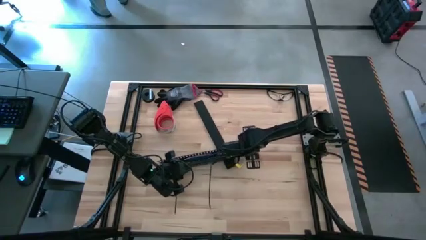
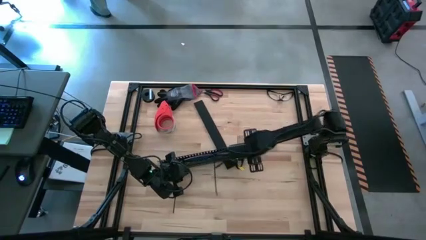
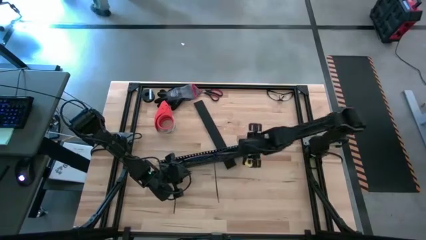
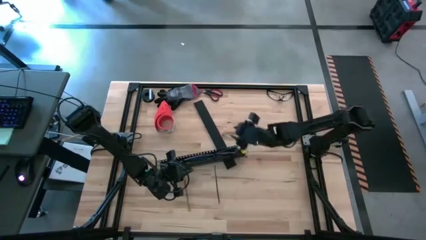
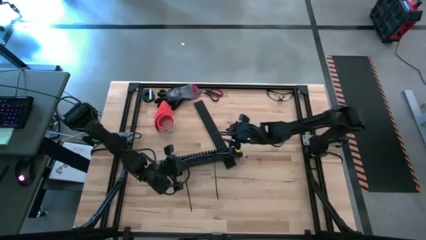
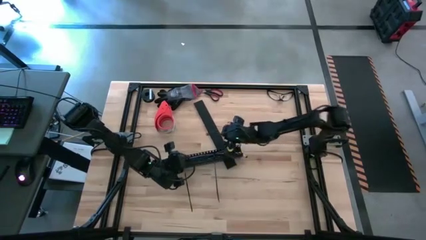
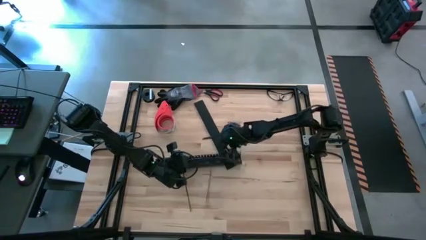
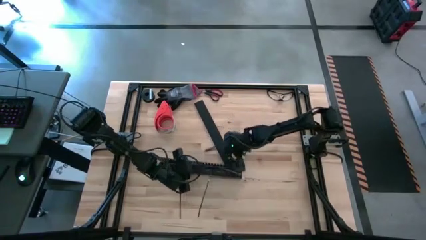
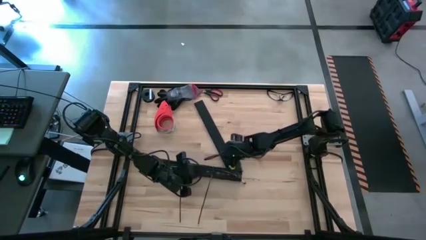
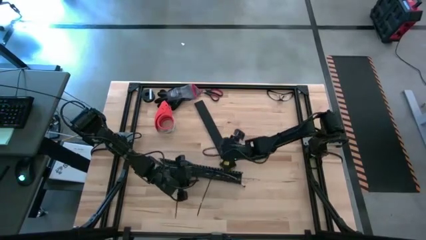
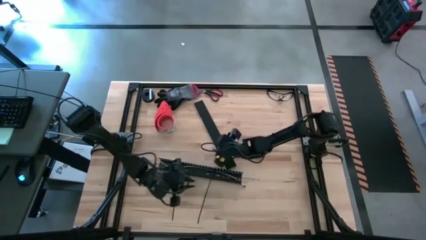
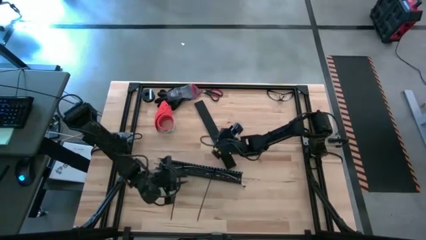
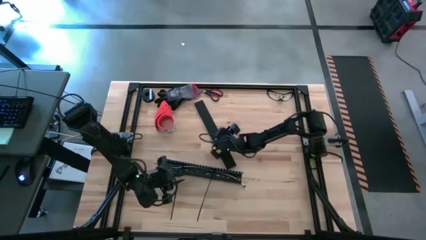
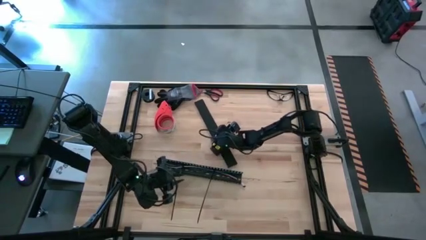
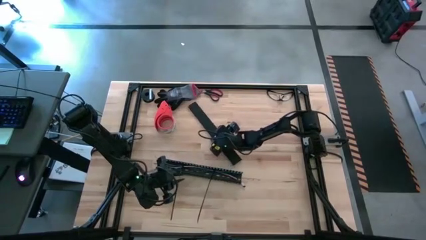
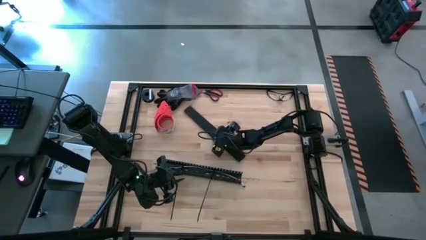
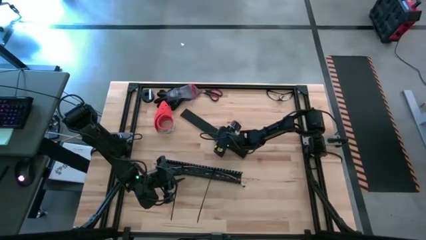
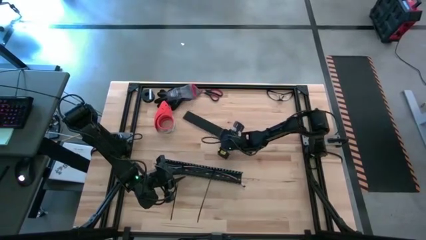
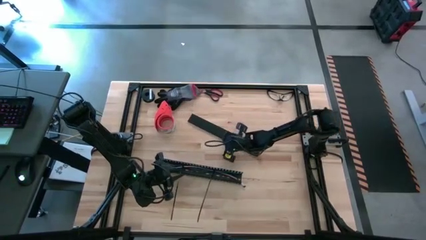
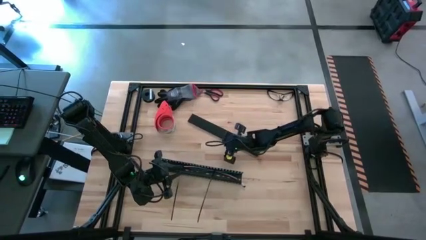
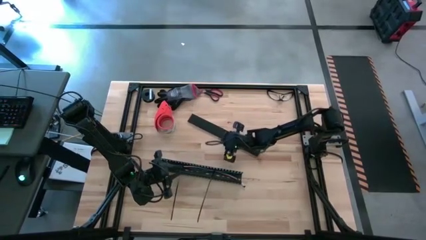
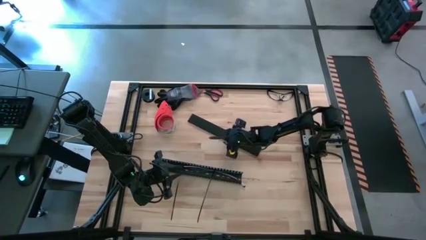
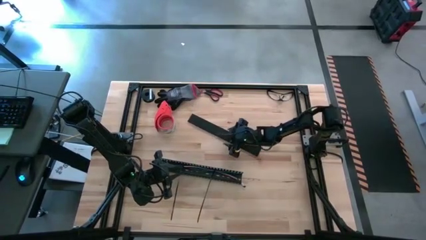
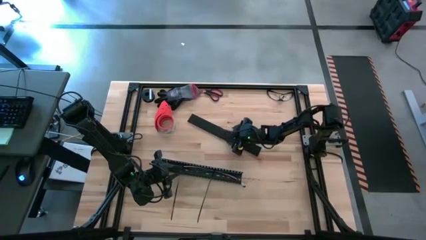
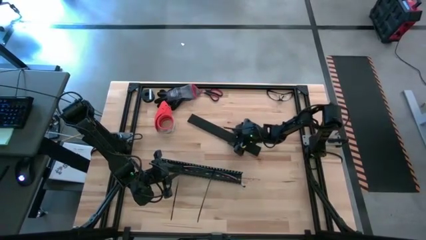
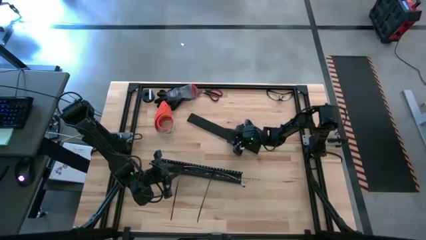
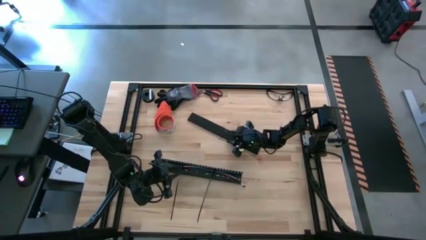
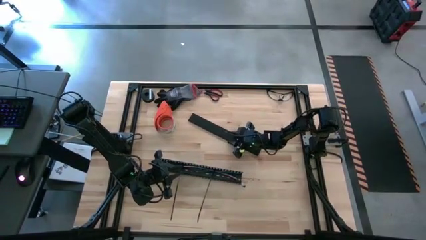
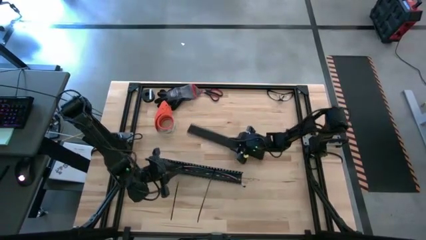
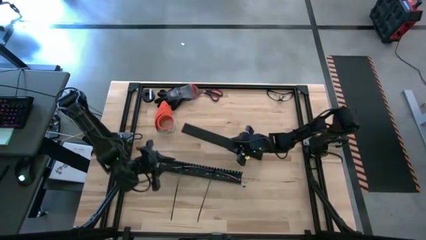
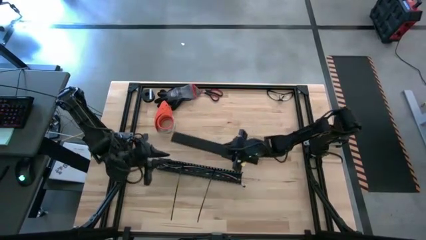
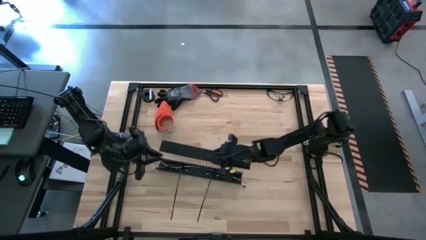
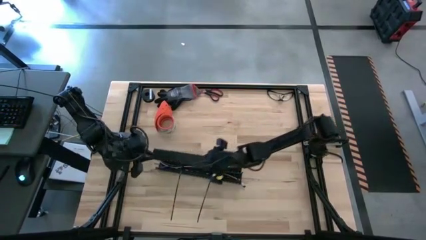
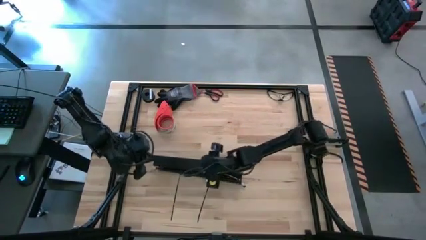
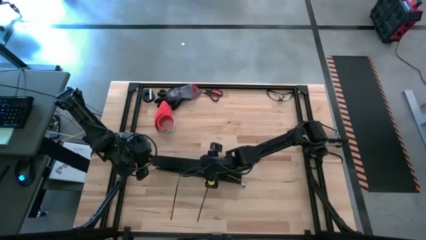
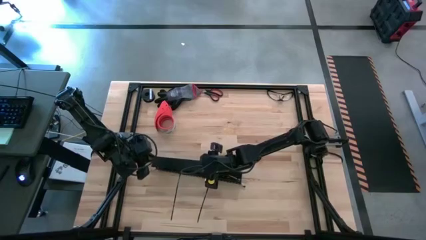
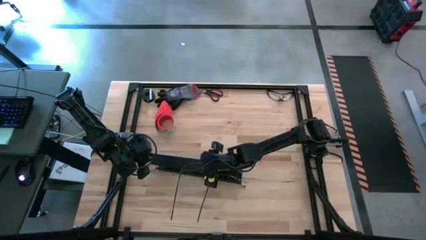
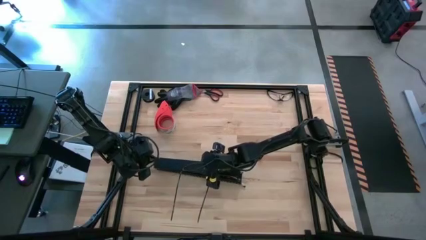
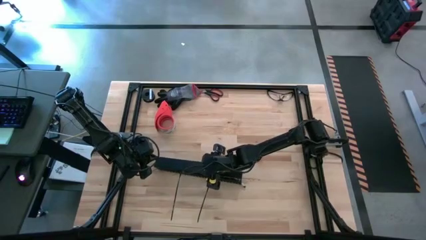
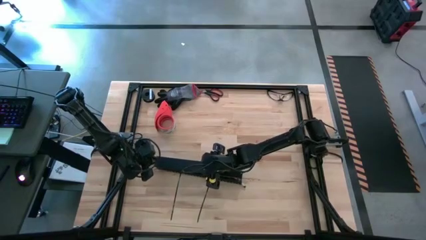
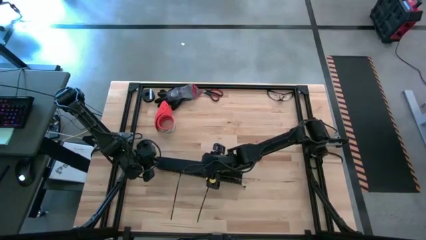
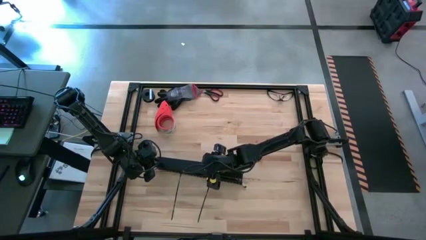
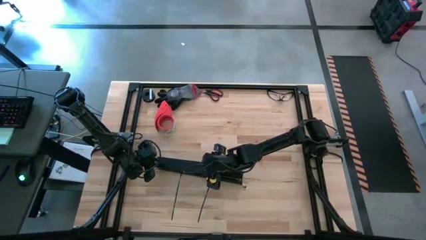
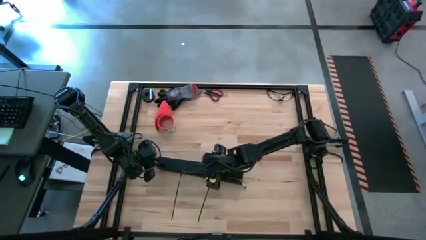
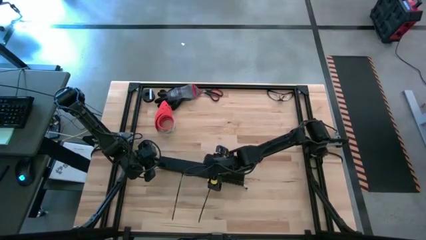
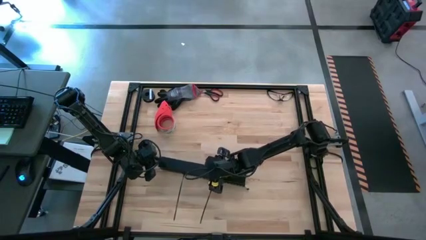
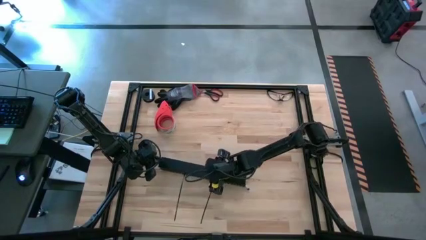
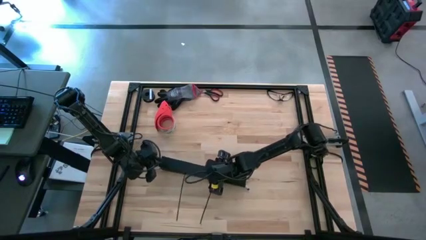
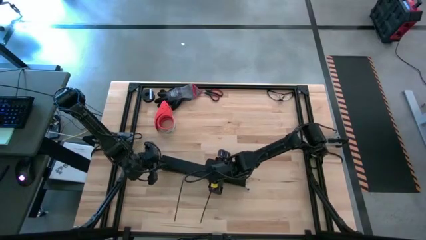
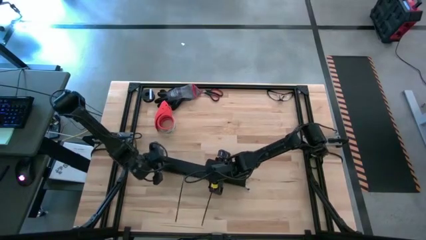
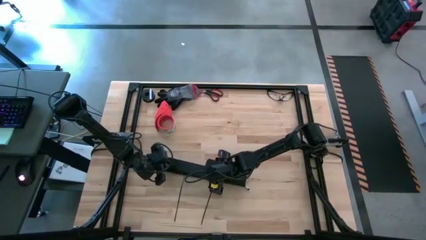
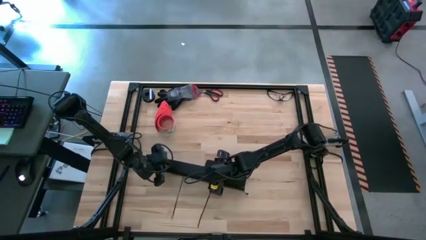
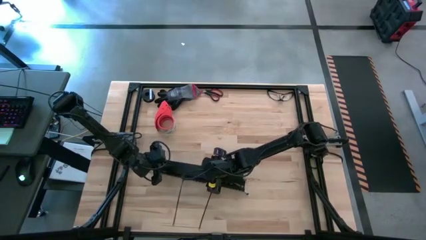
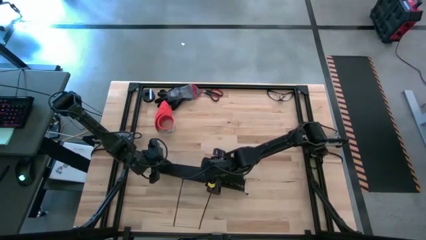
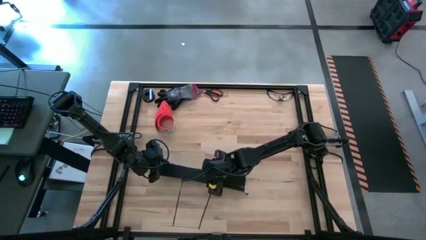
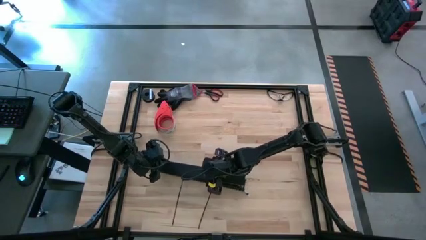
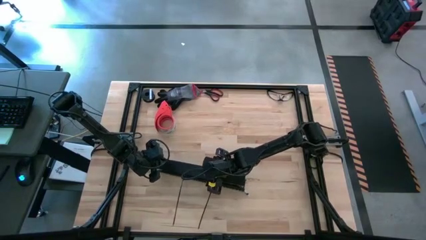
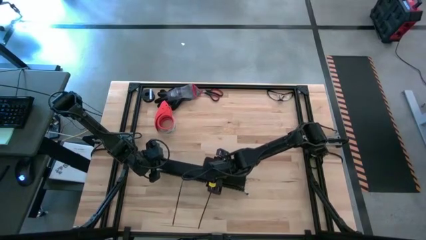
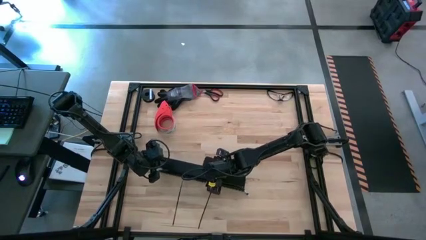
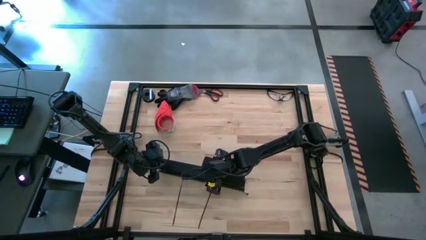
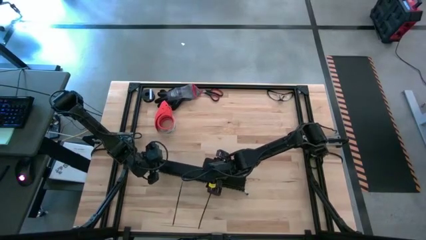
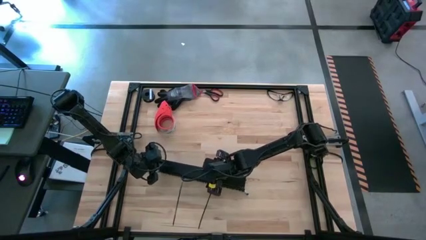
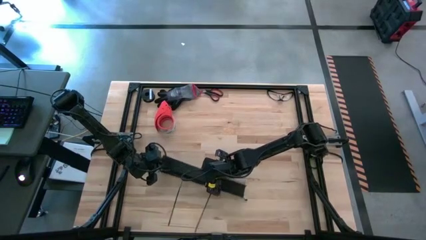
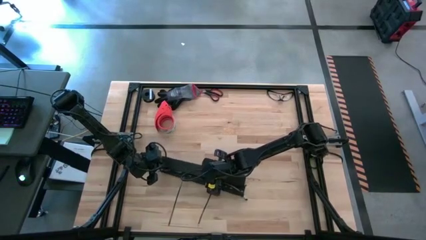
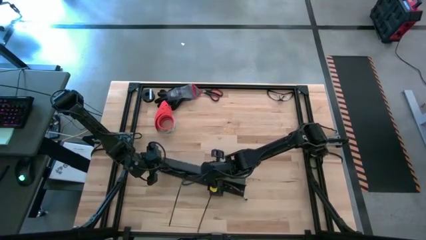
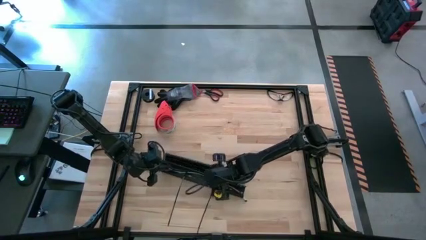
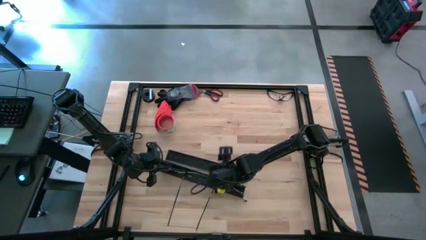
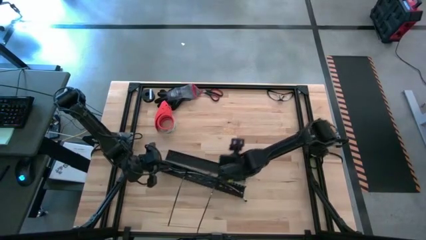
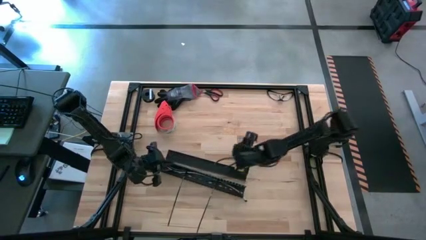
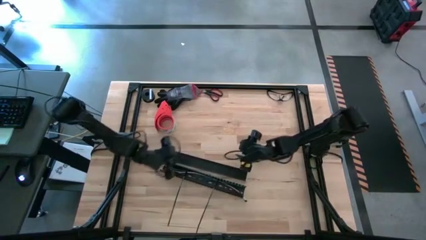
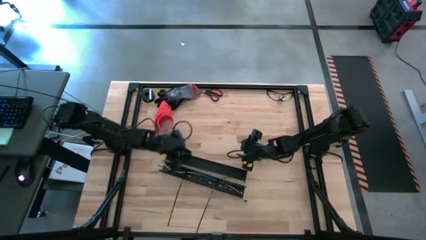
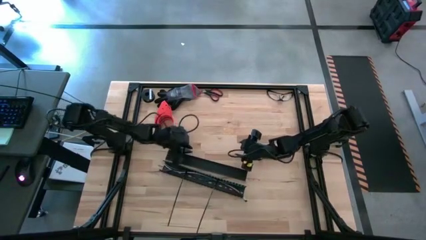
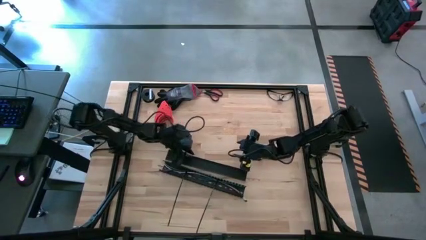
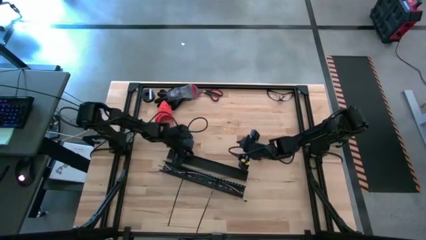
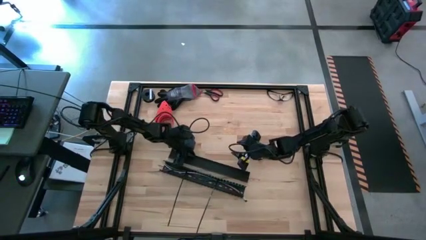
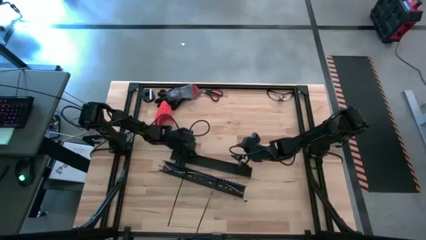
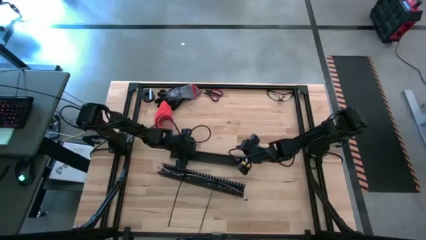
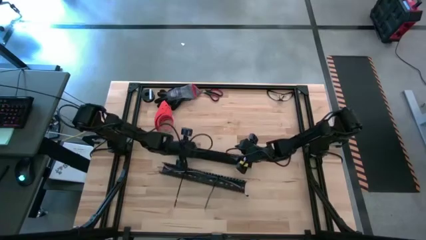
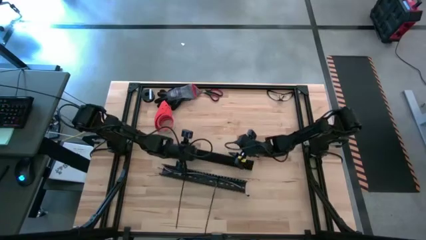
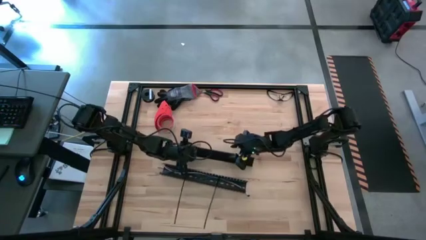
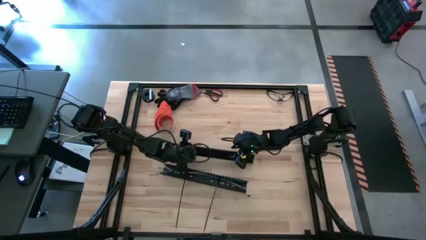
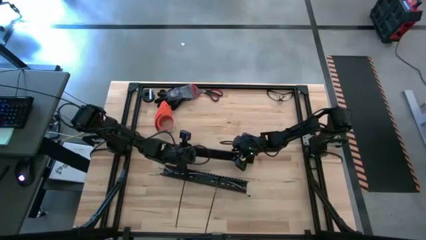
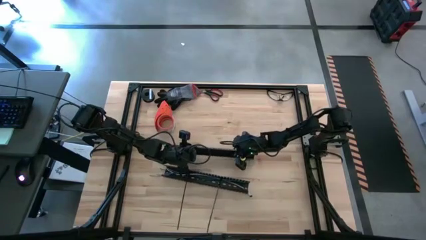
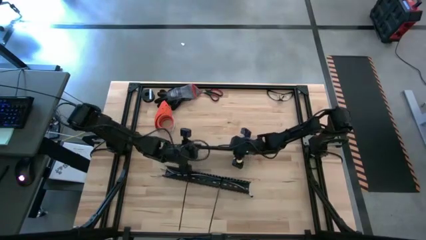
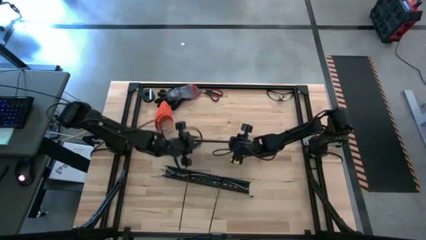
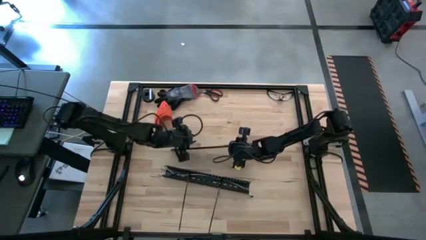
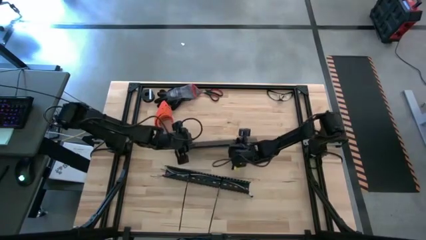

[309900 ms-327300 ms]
Task: Ziptie cables
Close the cable duct
